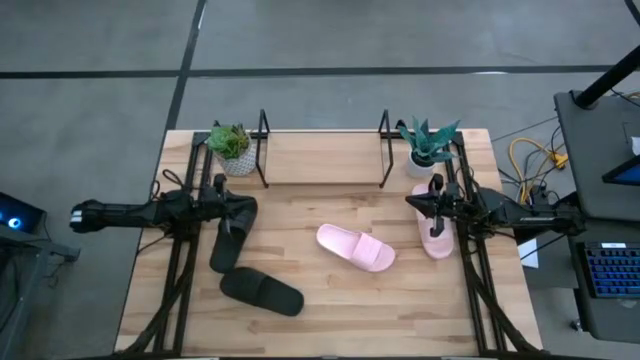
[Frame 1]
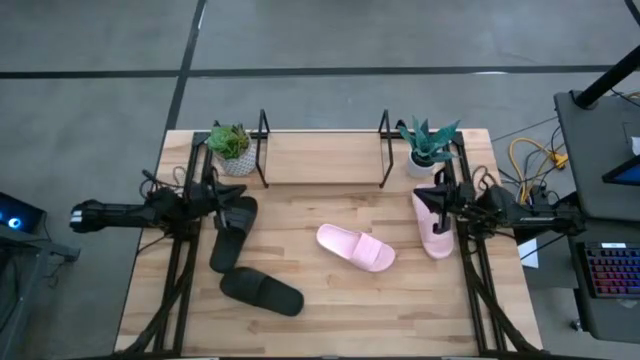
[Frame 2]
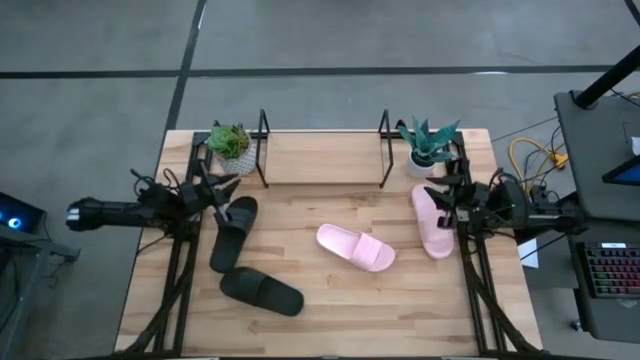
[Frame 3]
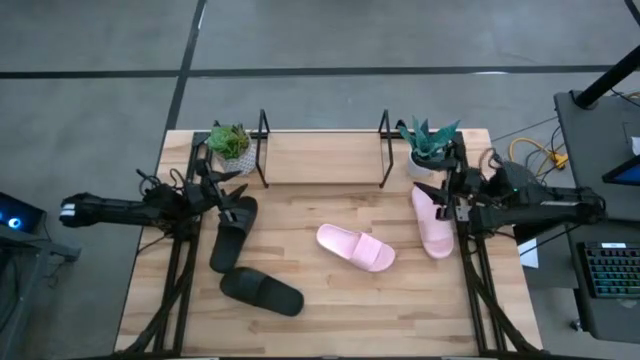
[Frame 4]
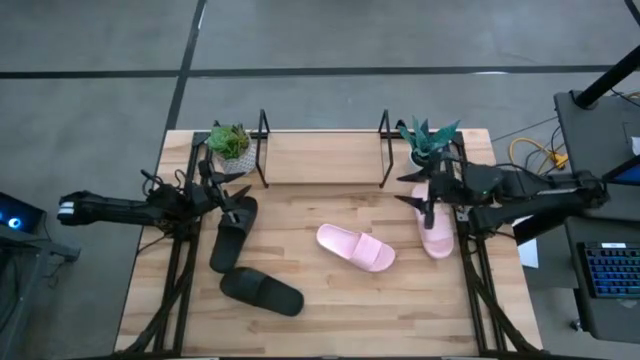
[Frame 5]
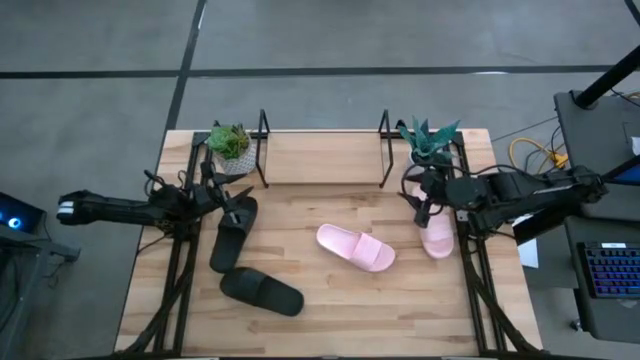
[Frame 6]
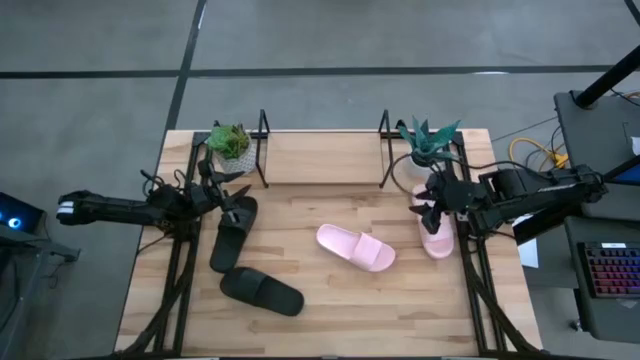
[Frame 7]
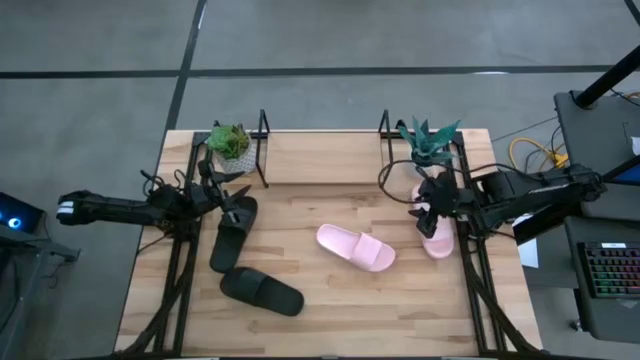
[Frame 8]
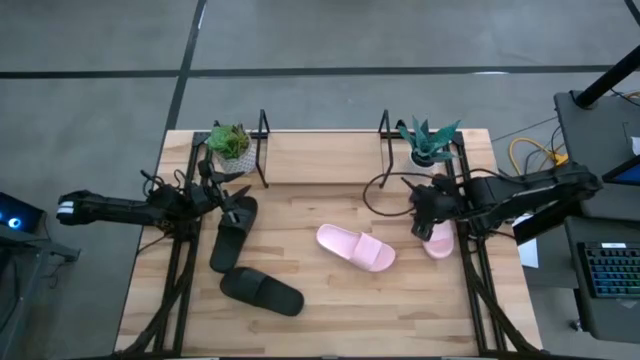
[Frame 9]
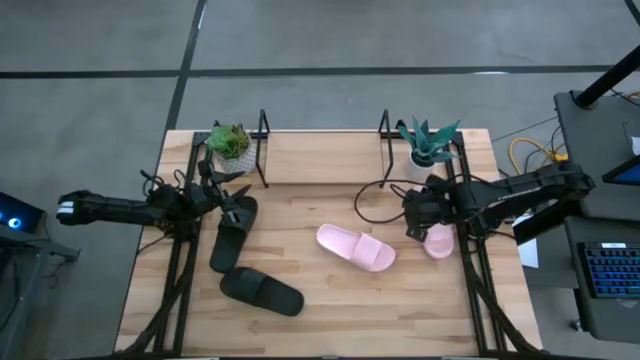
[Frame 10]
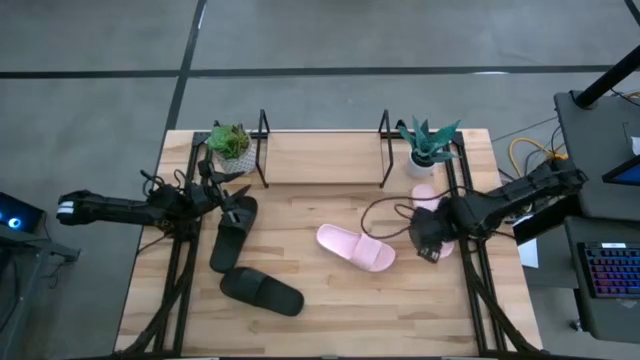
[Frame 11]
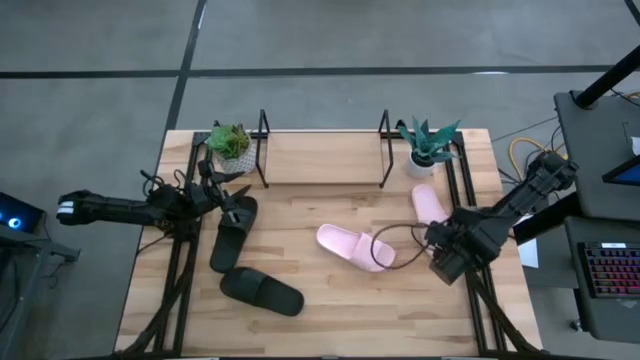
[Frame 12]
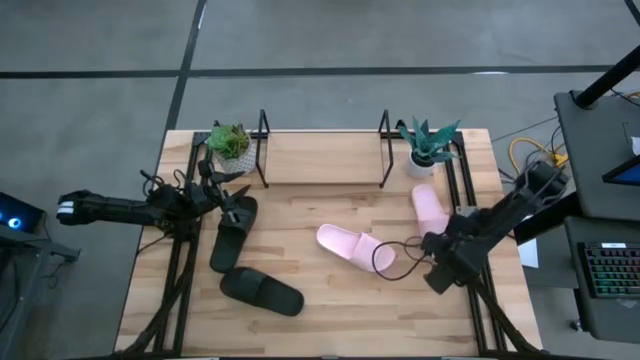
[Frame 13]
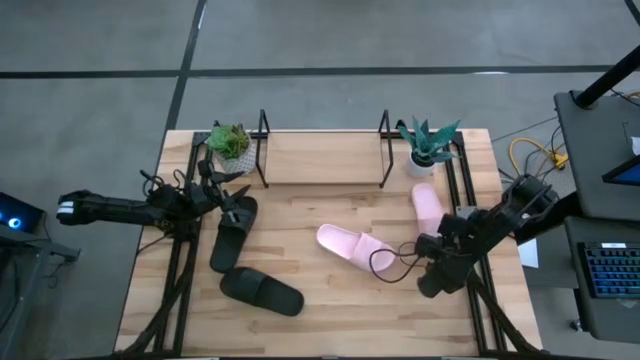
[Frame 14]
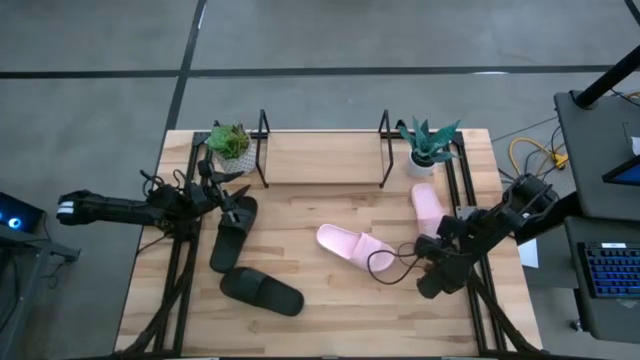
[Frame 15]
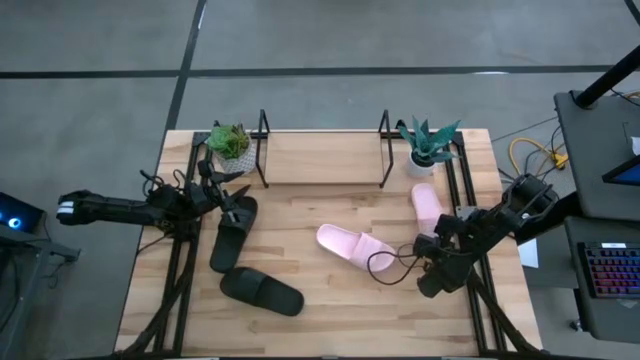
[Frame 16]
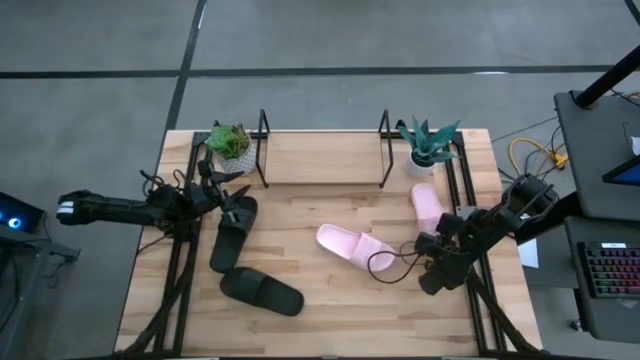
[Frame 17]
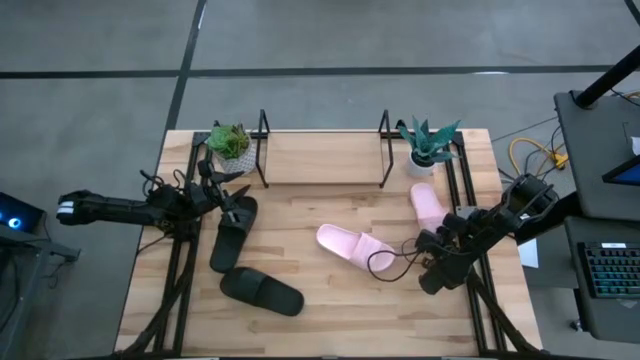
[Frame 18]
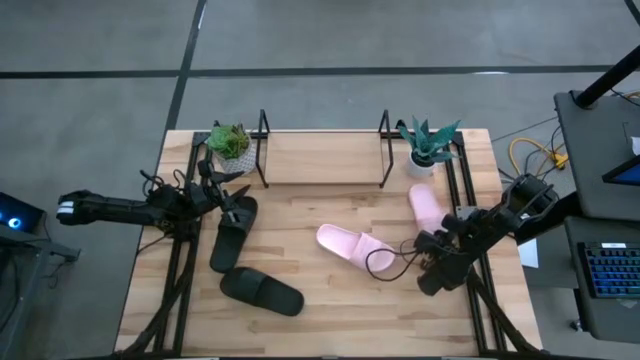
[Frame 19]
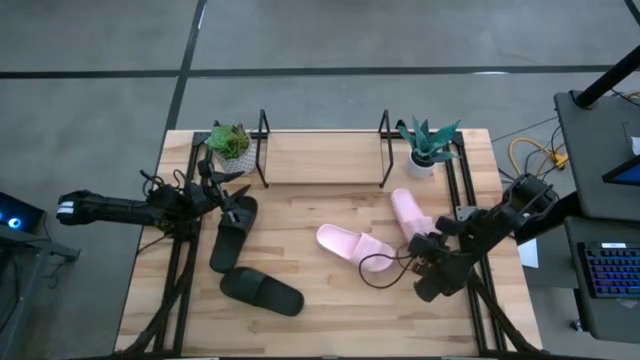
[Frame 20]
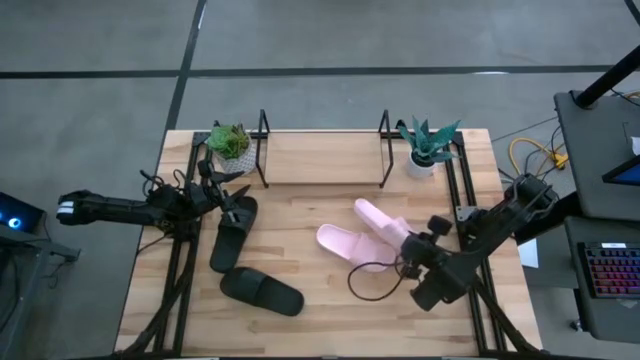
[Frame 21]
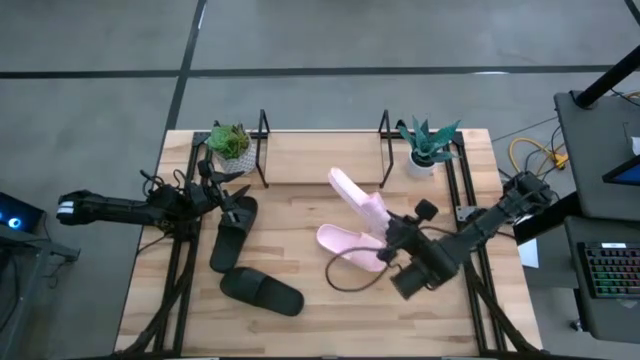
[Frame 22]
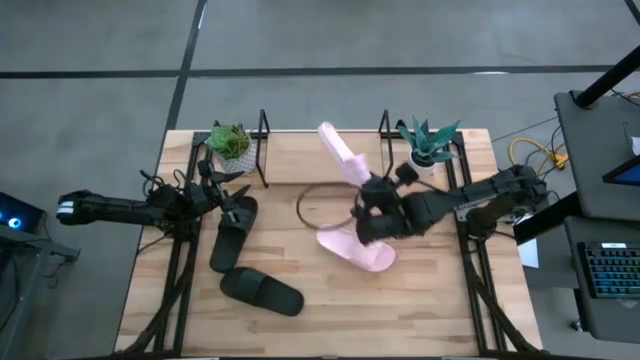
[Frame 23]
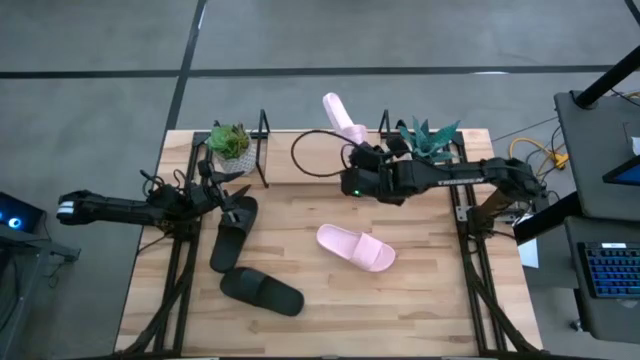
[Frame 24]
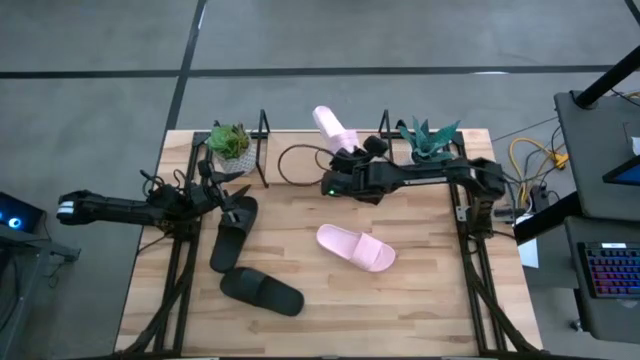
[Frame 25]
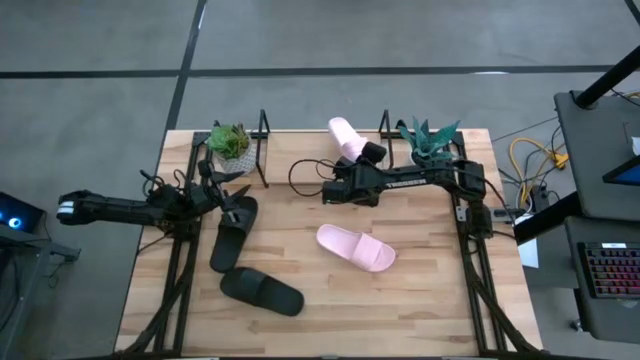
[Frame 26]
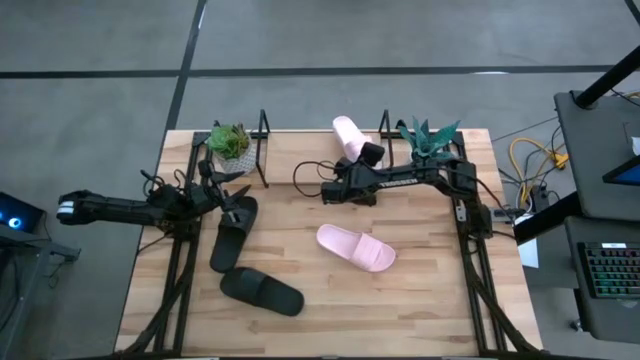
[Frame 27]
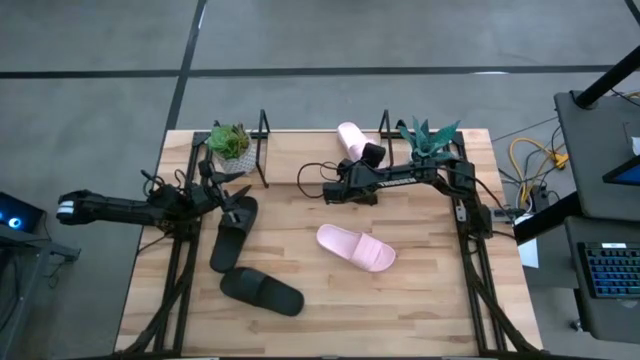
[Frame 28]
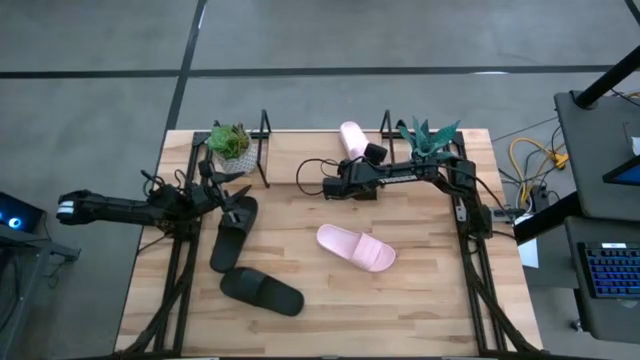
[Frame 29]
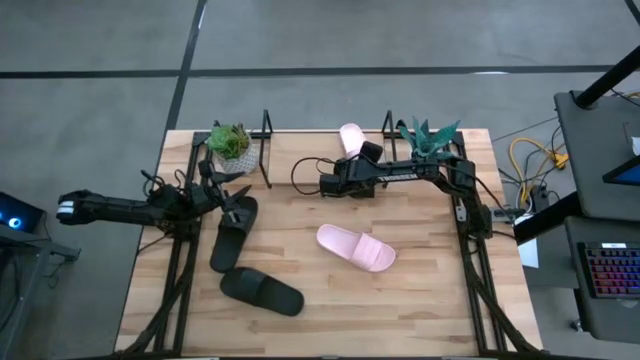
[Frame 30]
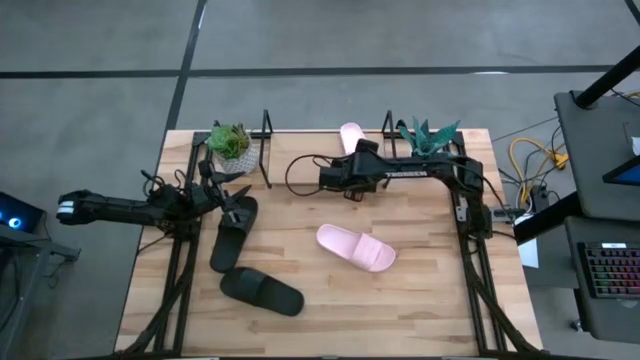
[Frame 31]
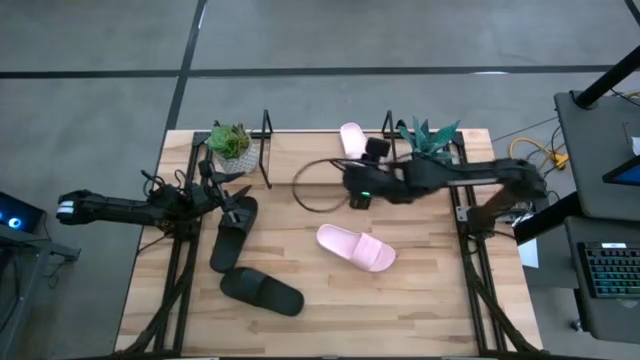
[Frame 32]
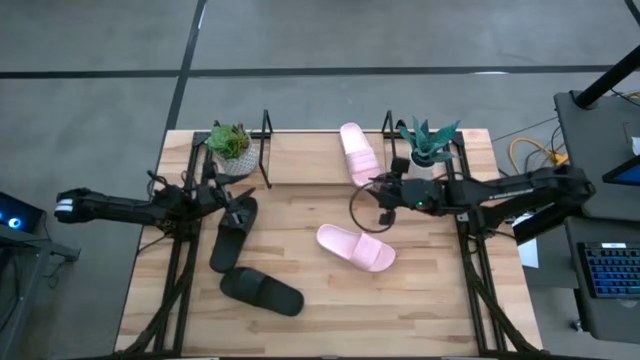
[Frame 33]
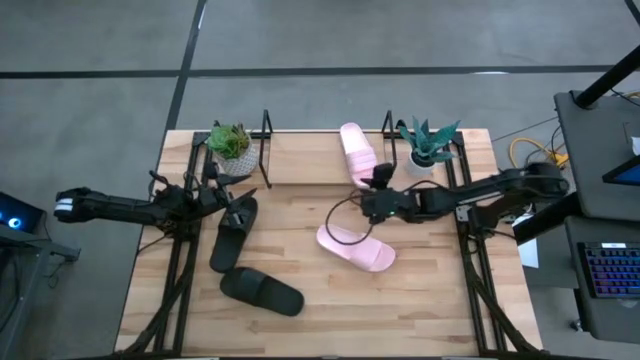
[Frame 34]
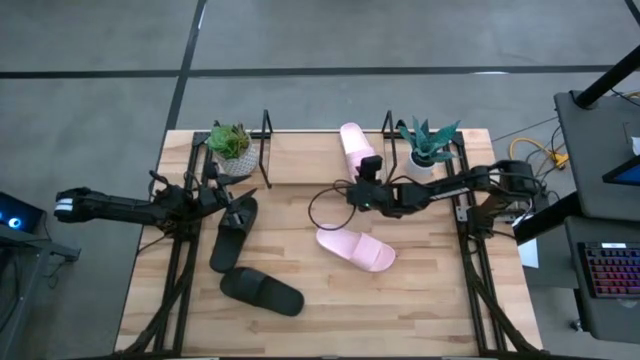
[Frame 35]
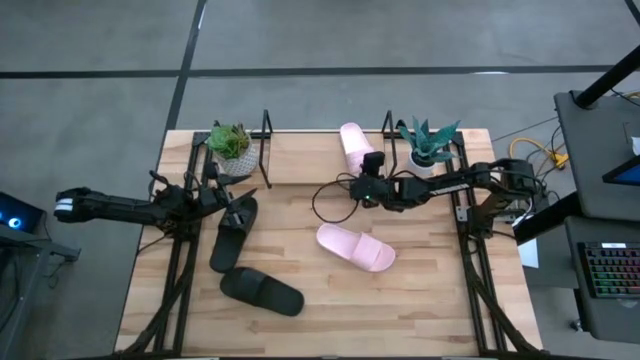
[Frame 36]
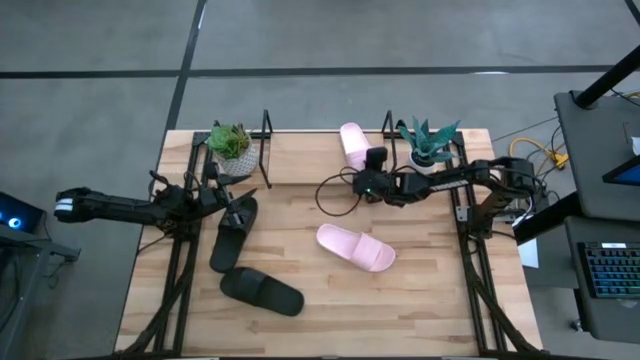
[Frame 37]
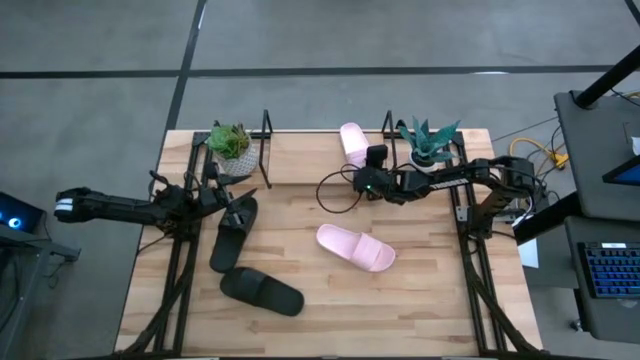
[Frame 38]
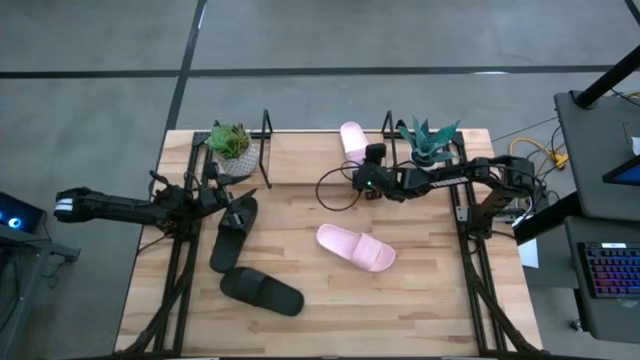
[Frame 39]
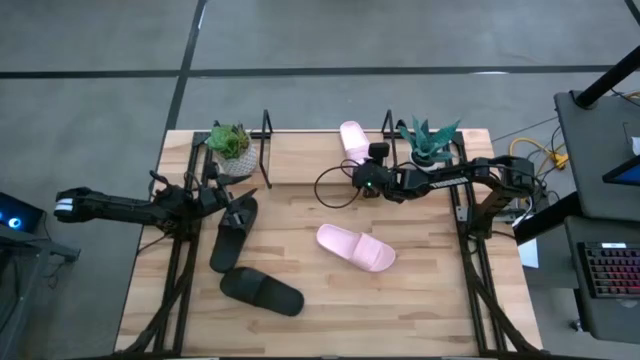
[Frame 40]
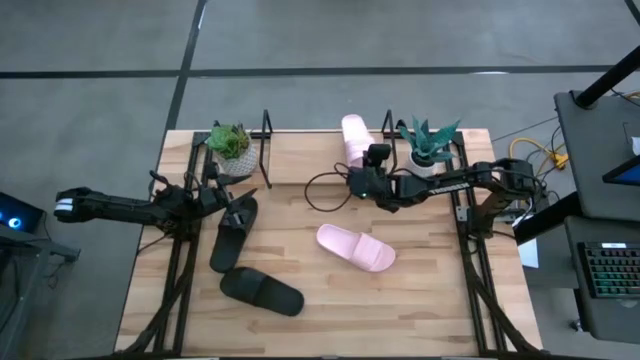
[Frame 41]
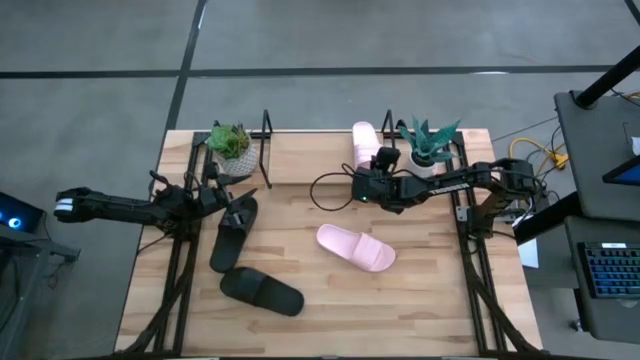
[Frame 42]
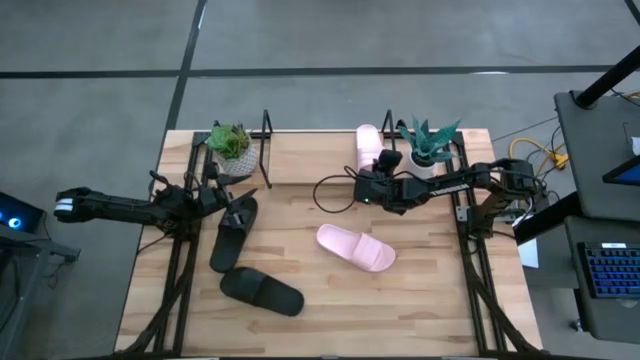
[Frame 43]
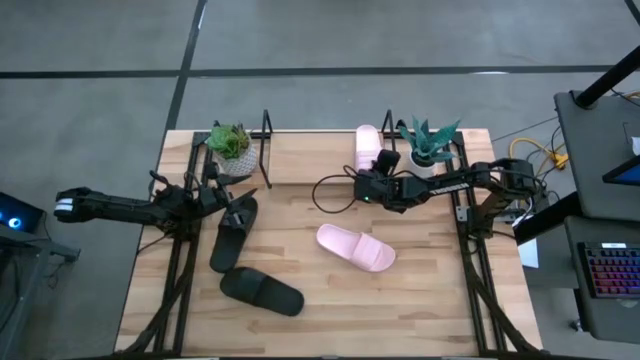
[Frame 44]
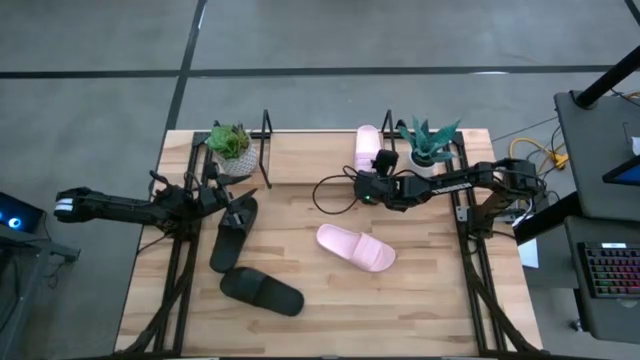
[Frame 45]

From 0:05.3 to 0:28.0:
Task: Pick and place slides into the shelf
Put the right pink slipper on the shelf
